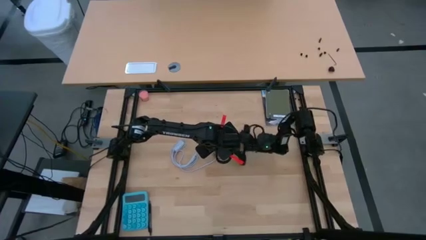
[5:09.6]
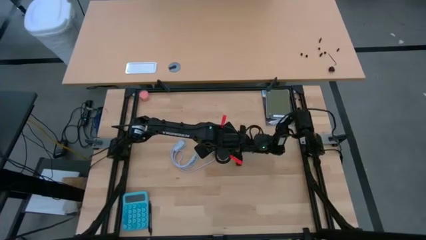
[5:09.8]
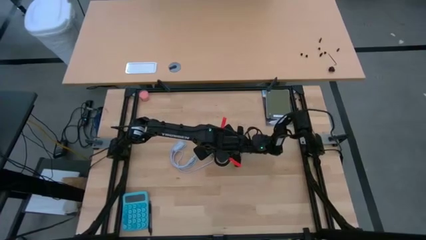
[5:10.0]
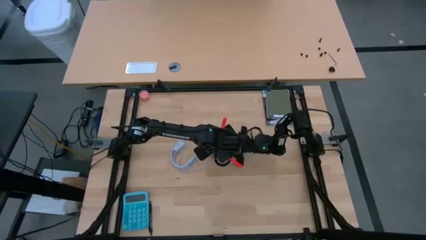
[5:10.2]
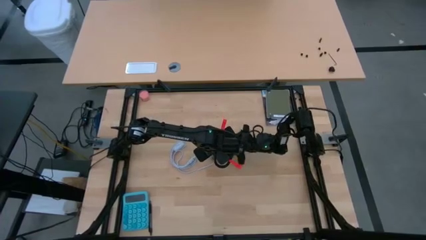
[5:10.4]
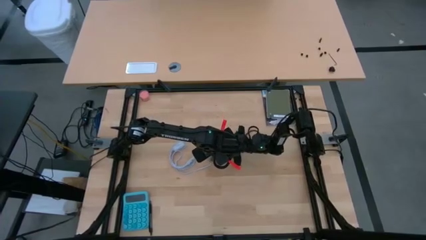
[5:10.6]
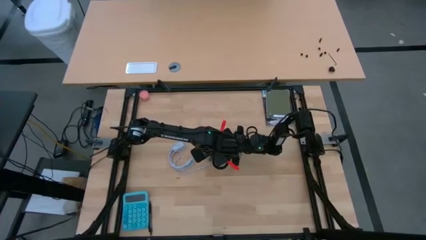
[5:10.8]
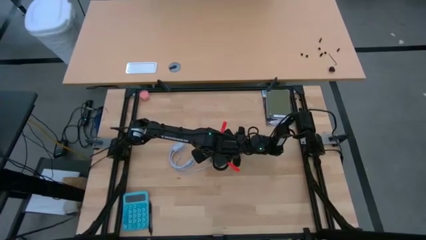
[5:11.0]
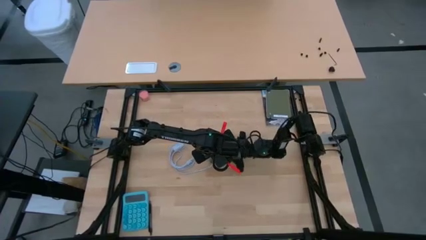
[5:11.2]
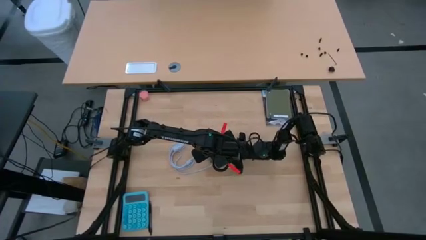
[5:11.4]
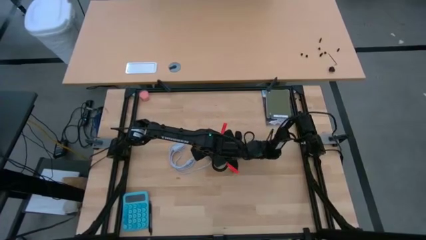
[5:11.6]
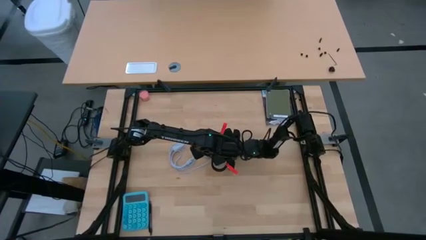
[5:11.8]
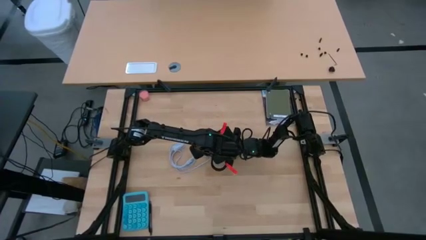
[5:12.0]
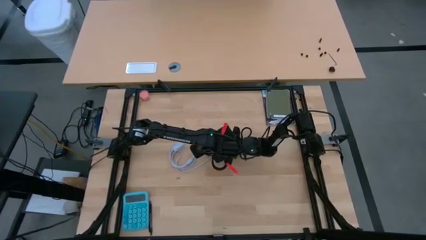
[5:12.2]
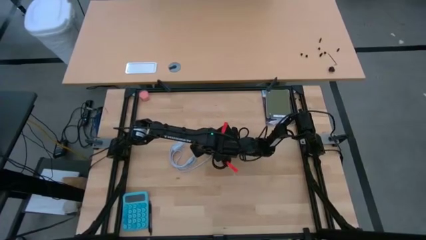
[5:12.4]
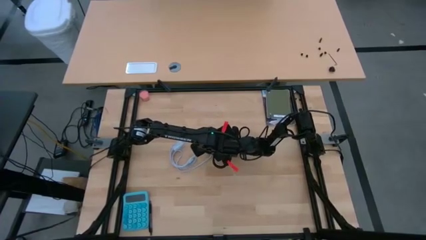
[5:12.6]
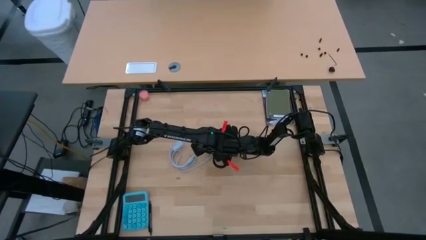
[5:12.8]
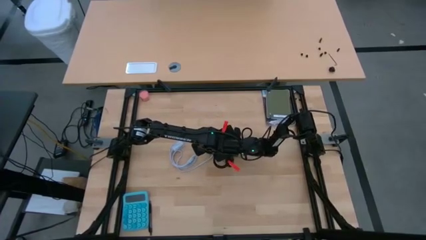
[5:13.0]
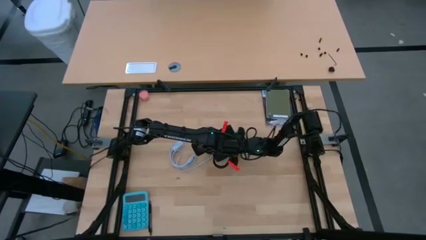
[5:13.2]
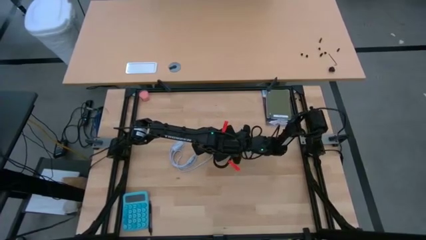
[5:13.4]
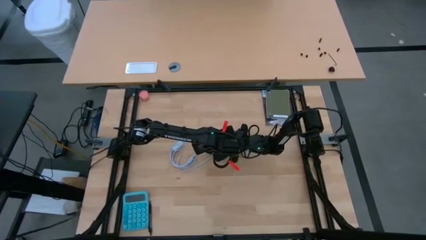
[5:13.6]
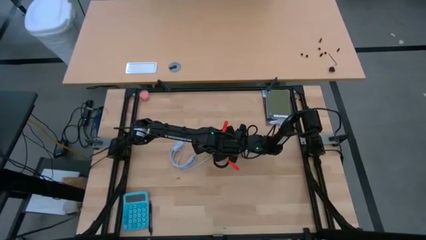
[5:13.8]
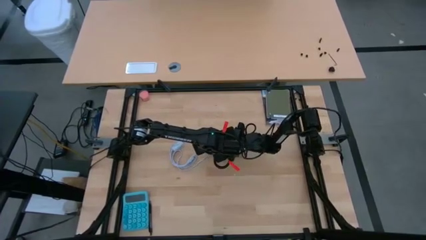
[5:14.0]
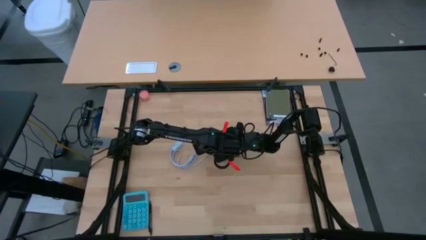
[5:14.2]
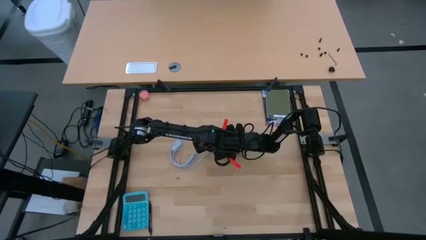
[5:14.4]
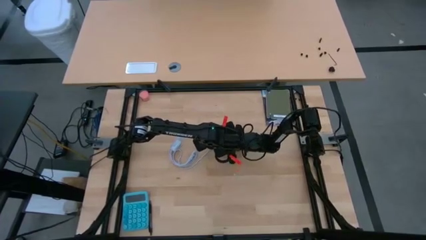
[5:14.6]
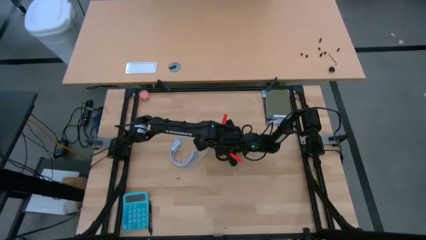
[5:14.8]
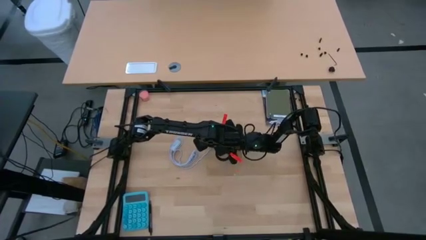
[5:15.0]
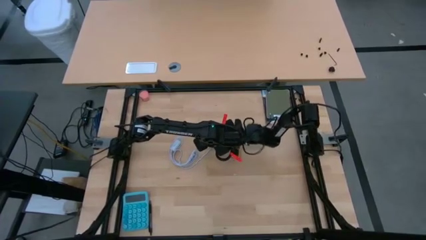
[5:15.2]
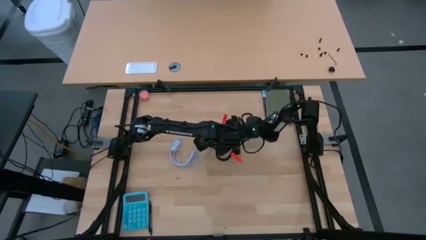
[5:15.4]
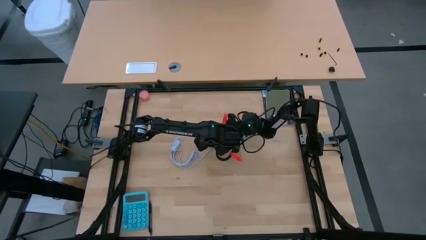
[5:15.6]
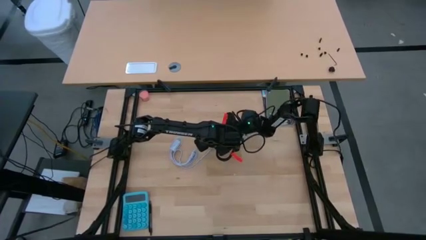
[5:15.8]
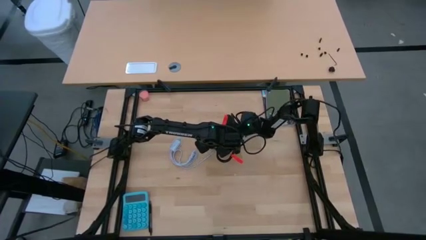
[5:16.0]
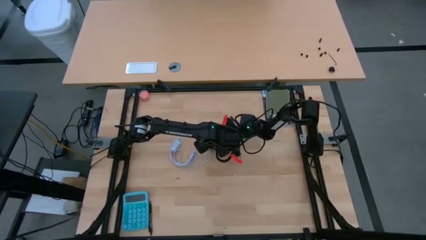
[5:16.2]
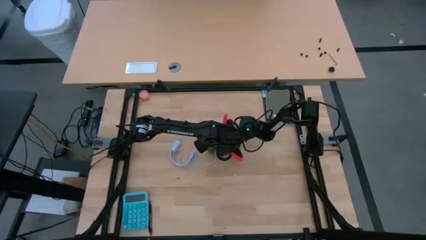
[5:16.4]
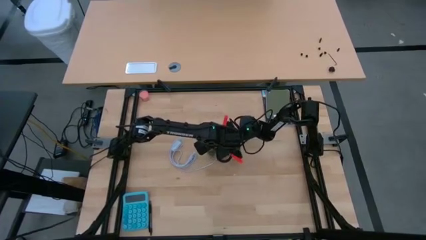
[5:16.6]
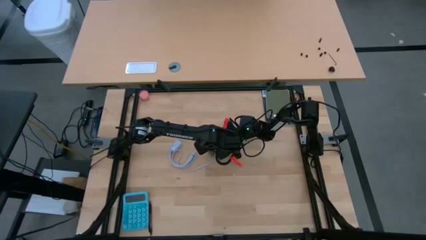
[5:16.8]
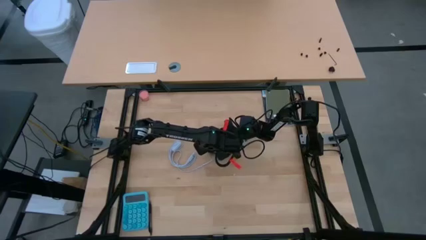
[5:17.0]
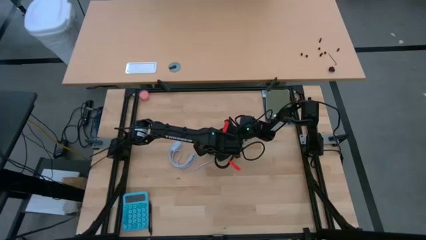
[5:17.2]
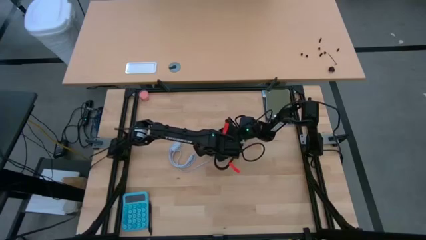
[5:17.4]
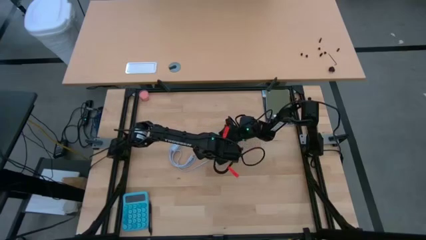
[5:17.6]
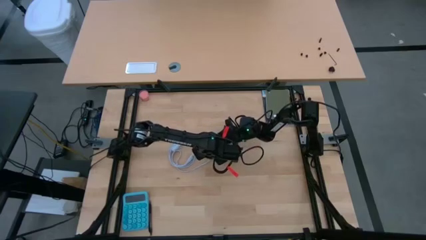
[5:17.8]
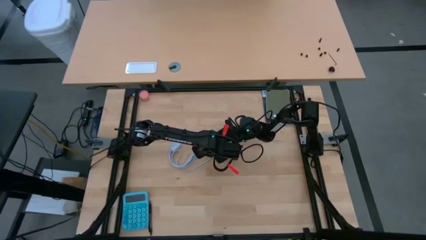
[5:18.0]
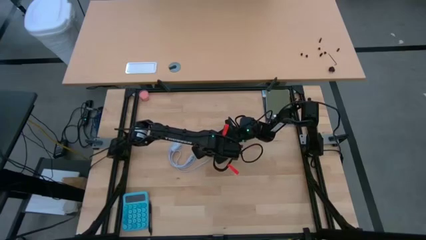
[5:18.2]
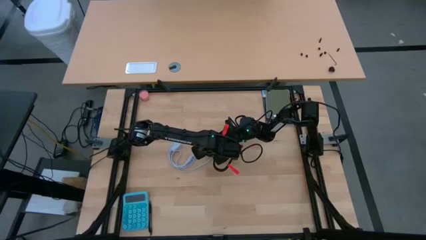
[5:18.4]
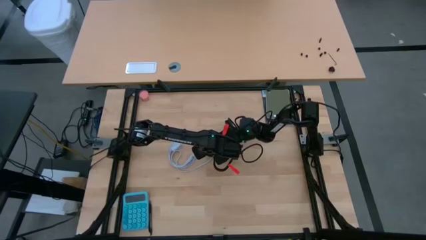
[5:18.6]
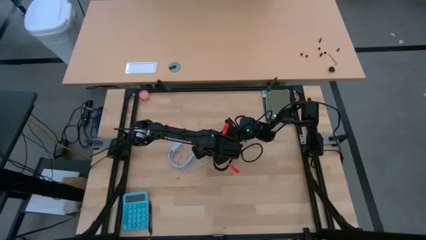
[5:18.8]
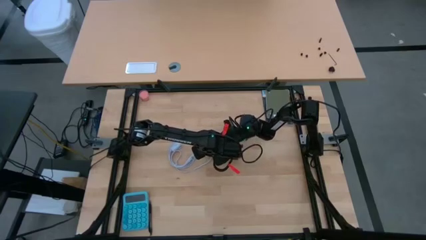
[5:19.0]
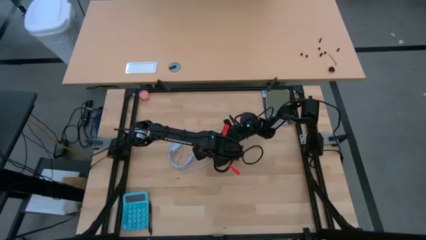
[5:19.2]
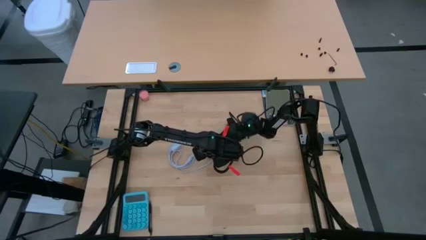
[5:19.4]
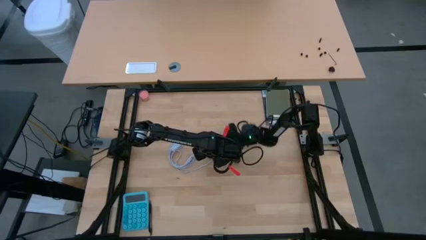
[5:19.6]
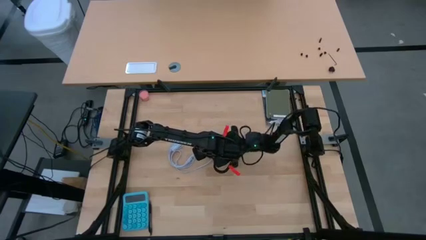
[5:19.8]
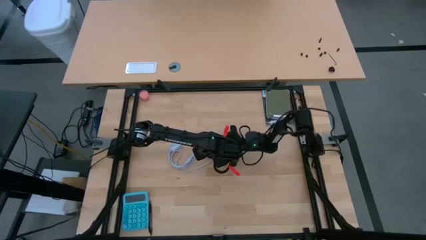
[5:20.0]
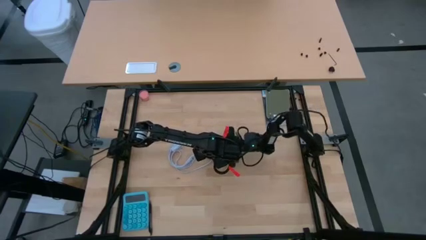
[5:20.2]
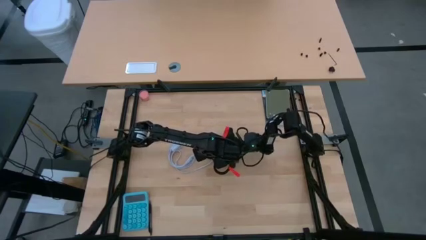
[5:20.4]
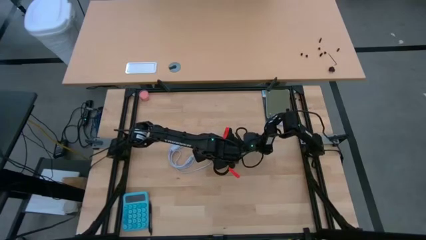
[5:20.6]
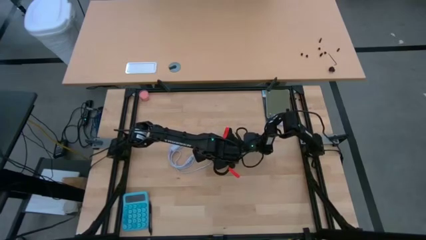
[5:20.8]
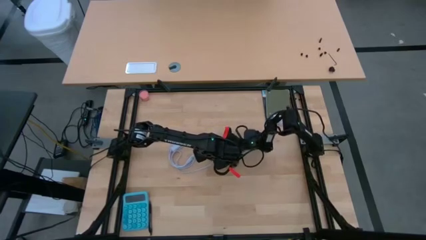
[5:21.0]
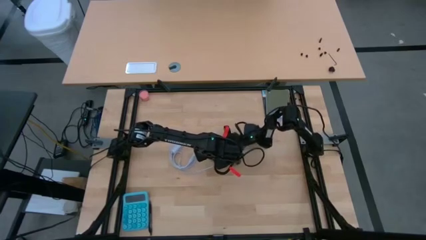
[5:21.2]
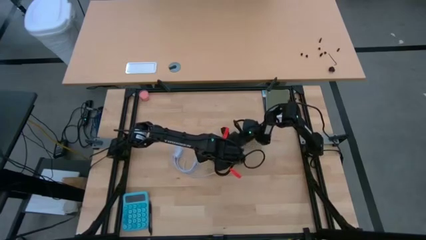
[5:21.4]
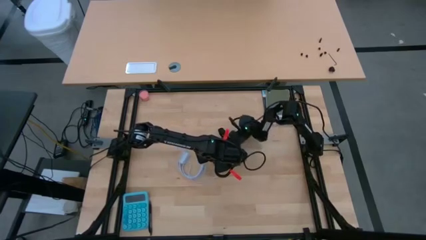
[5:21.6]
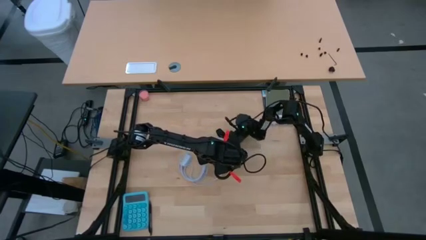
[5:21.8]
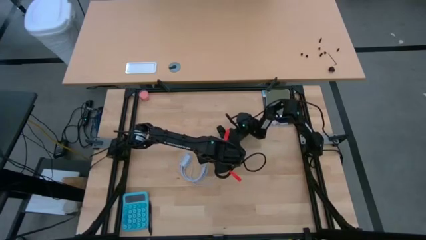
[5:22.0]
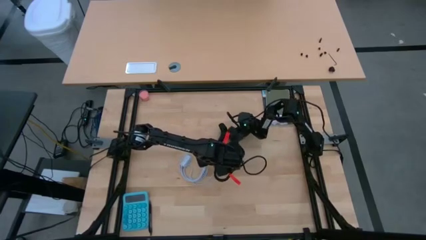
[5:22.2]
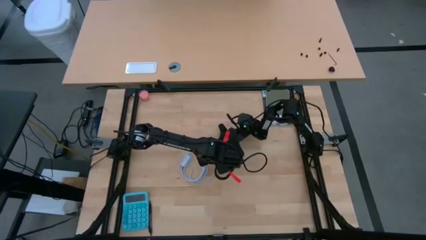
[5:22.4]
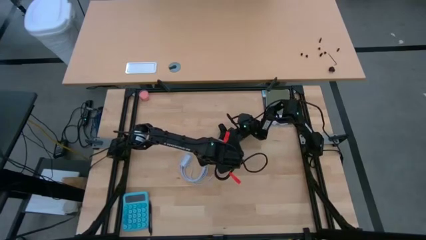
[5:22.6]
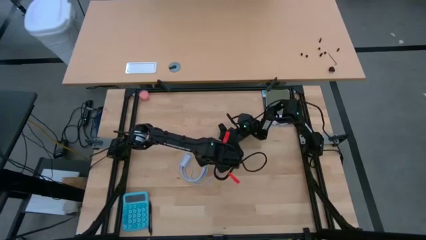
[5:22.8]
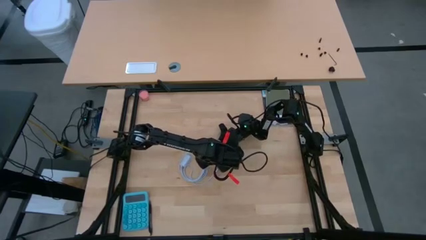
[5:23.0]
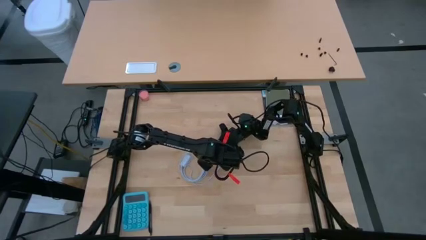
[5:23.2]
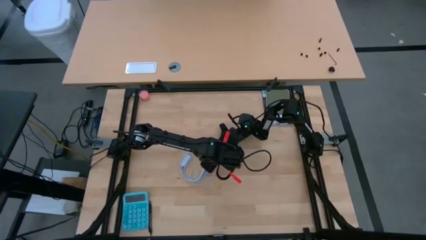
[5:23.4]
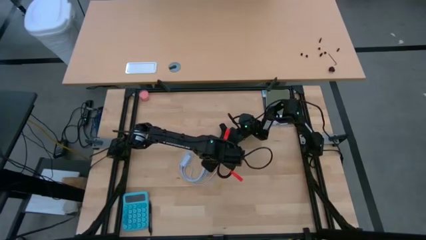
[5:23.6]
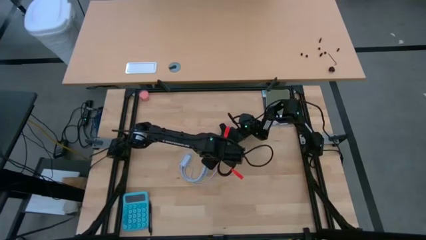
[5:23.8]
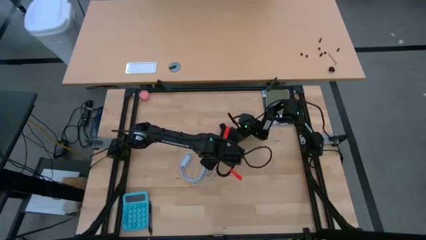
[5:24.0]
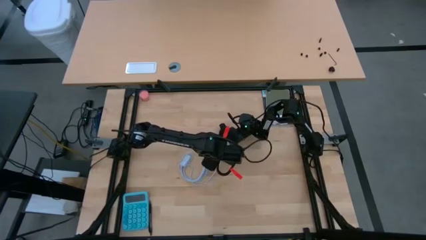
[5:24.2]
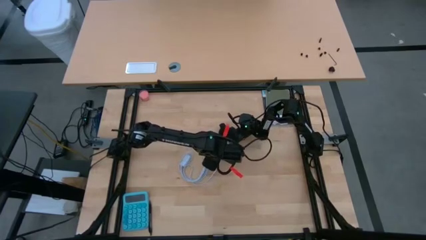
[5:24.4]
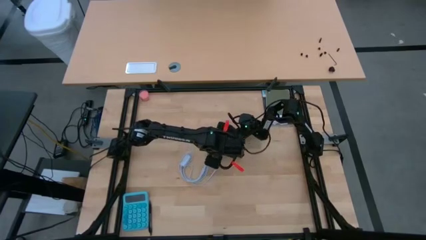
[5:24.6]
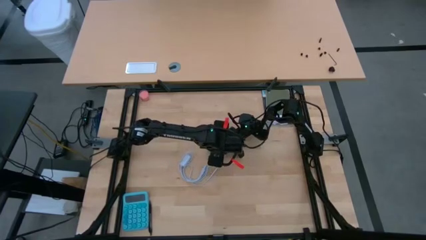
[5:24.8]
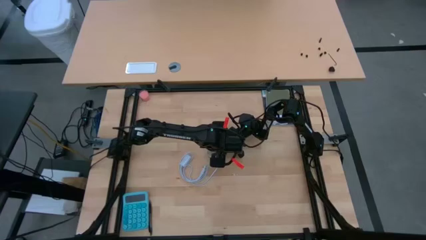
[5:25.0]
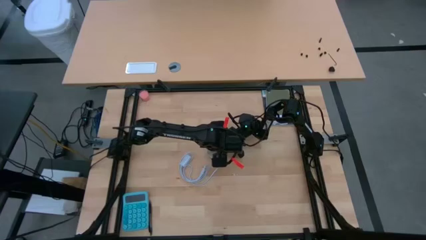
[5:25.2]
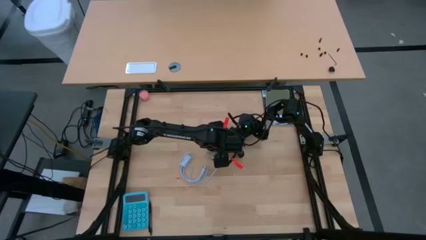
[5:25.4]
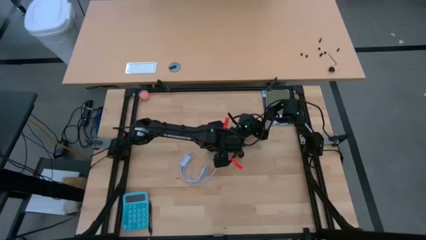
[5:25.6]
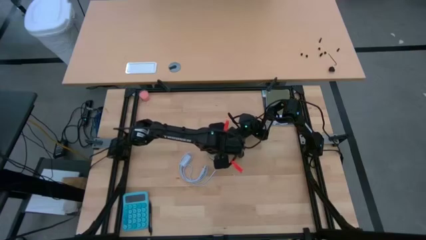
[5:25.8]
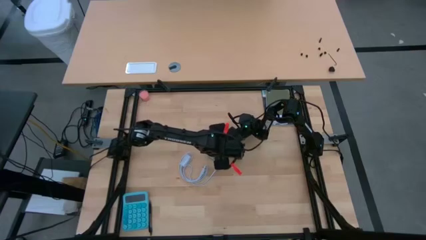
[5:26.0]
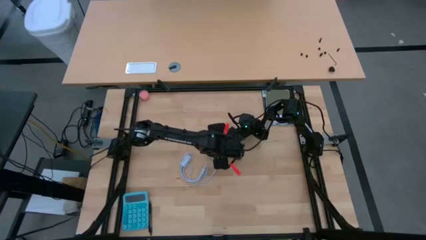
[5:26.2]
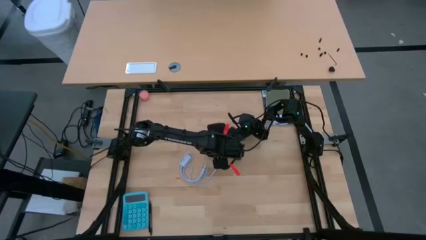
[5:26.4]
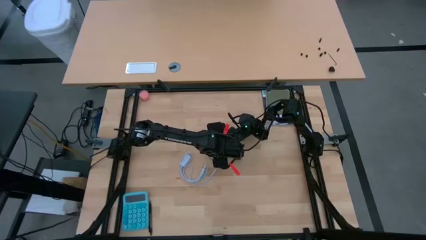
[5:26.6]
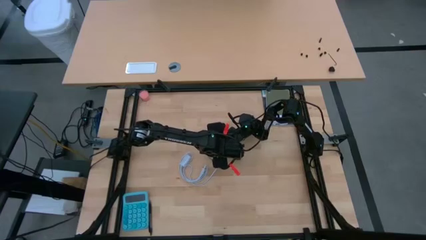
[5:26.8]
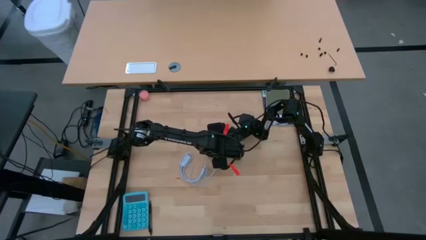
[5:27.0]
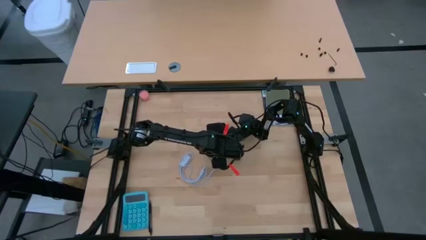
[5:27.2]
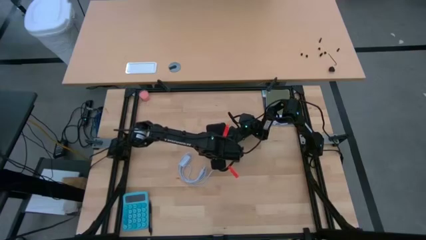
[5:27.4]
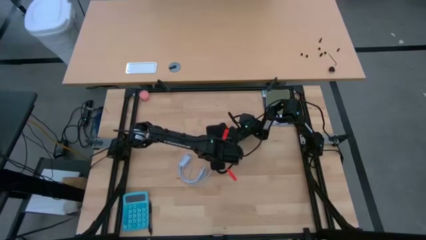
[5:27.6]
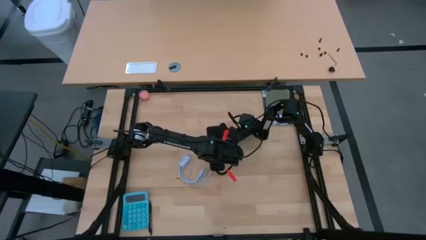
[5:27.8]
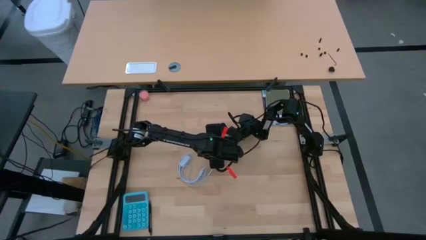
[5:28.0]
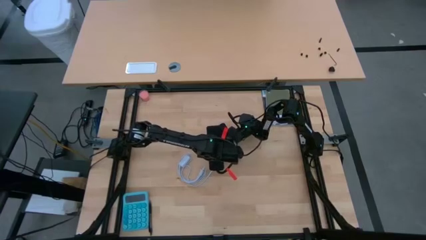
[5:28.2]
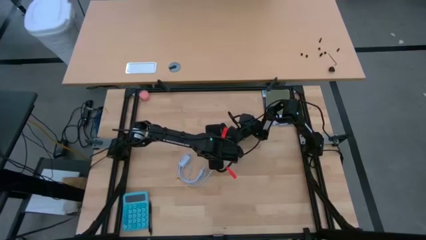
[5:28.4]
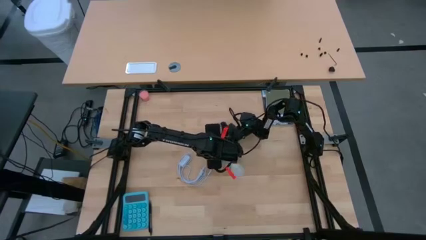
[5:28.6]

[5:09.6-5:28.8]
Task: Screw lightbulb
Insert the lightbulb into the lamp holder
